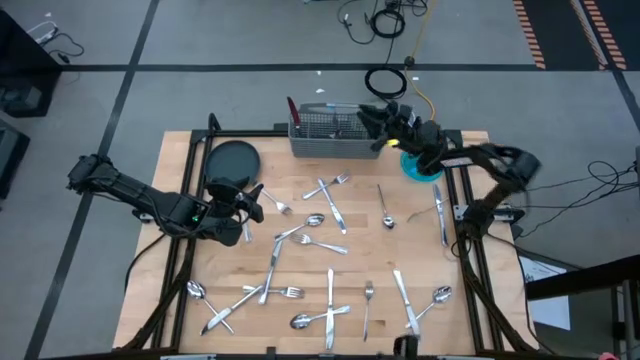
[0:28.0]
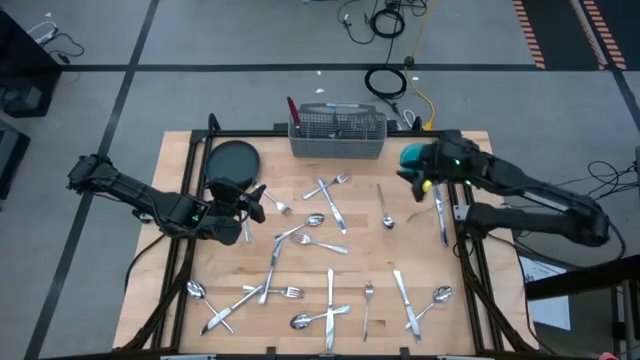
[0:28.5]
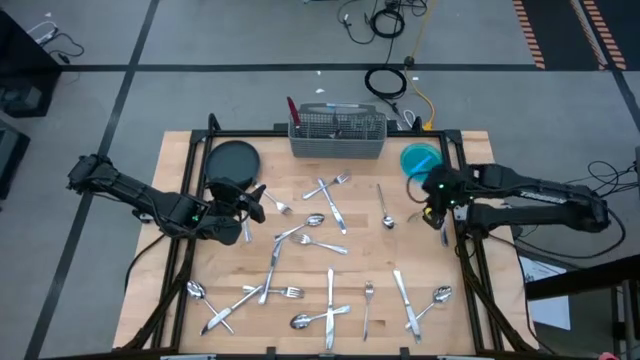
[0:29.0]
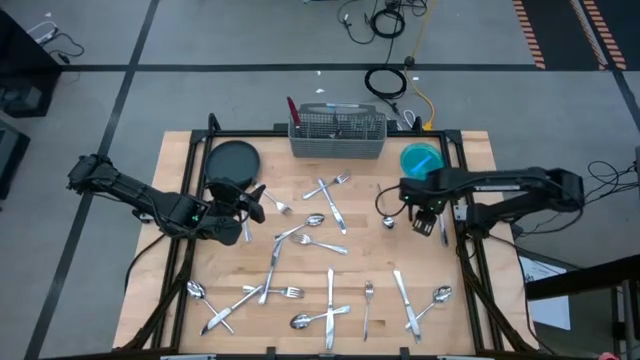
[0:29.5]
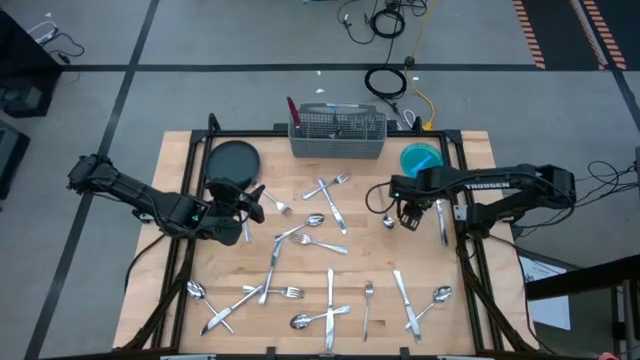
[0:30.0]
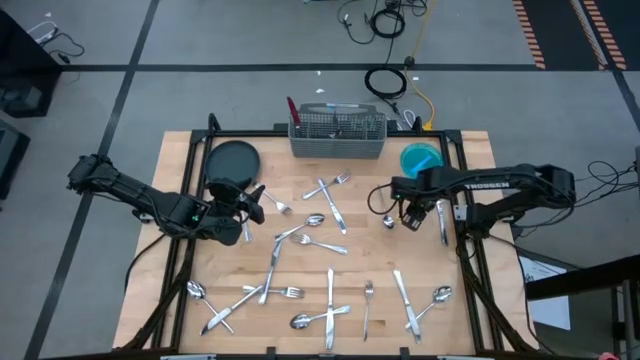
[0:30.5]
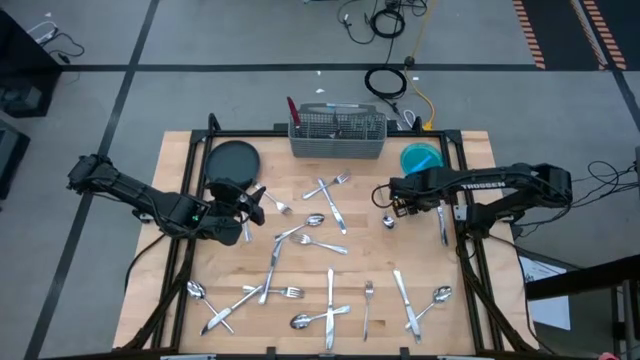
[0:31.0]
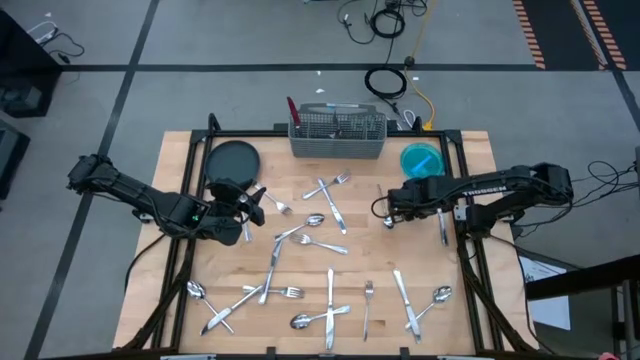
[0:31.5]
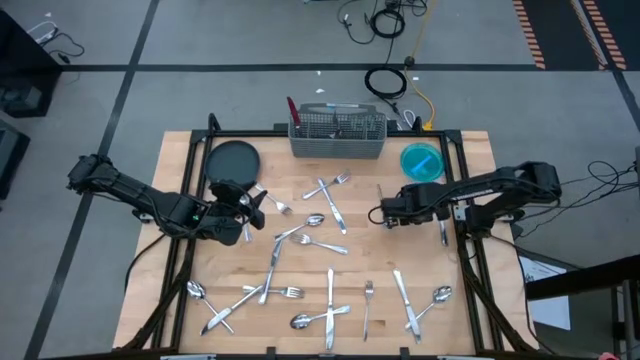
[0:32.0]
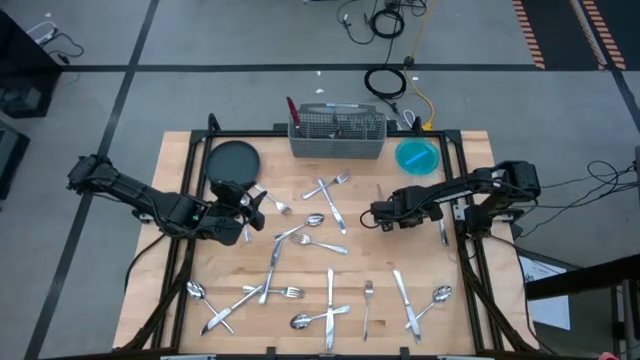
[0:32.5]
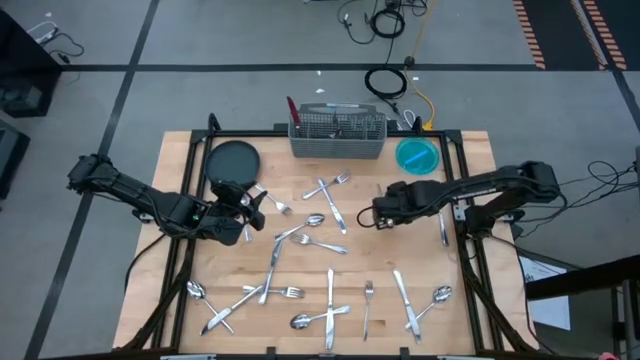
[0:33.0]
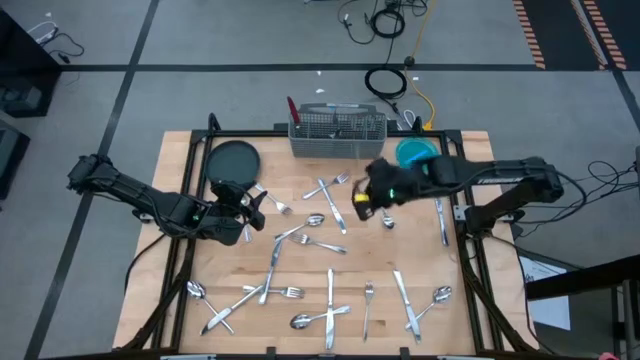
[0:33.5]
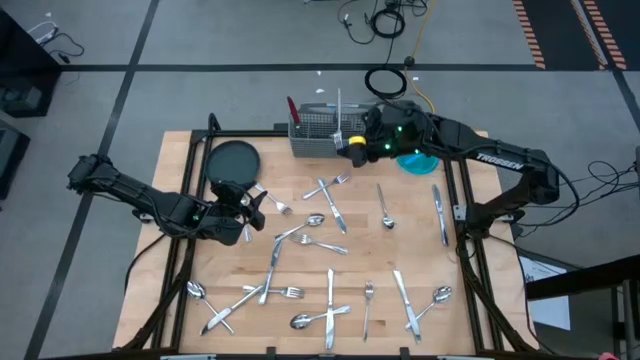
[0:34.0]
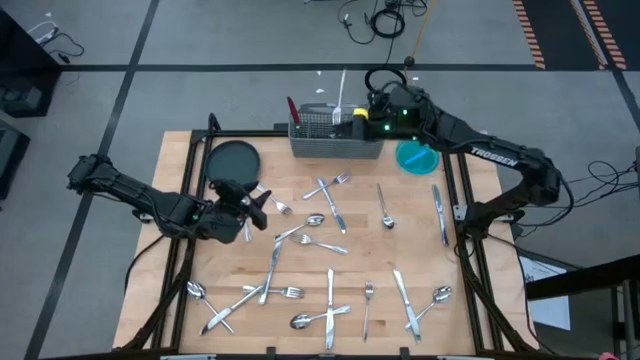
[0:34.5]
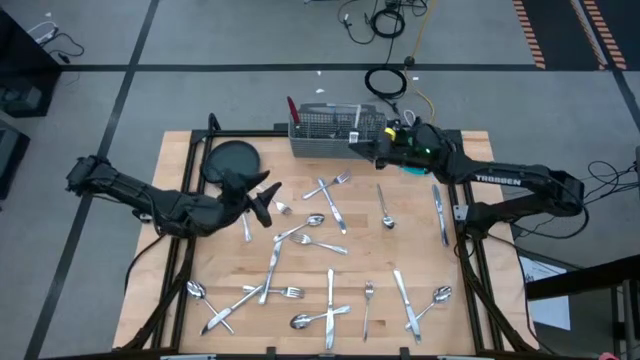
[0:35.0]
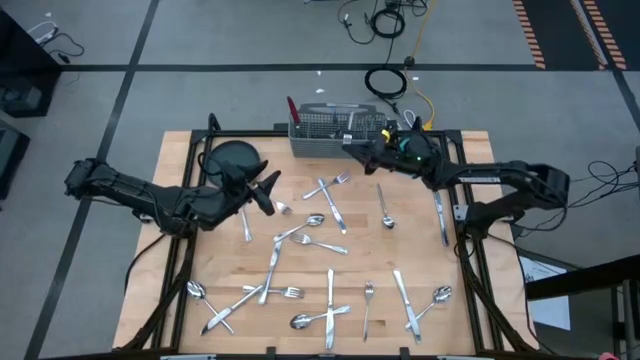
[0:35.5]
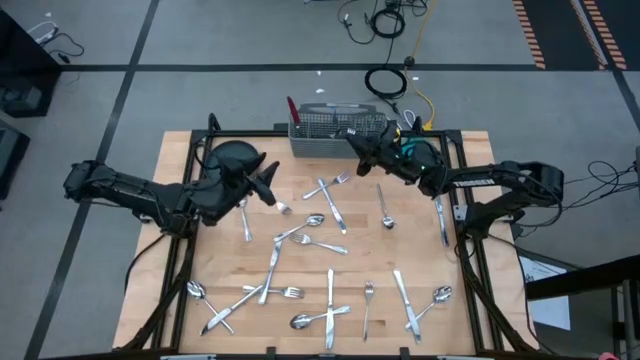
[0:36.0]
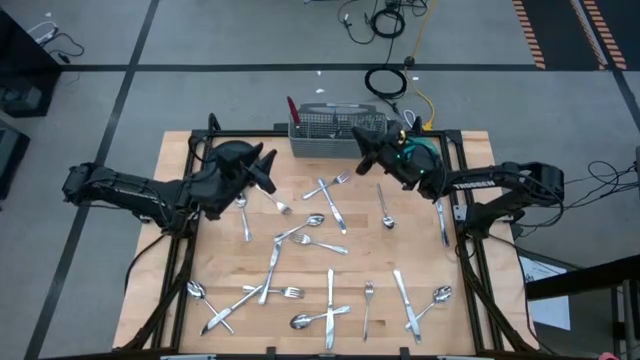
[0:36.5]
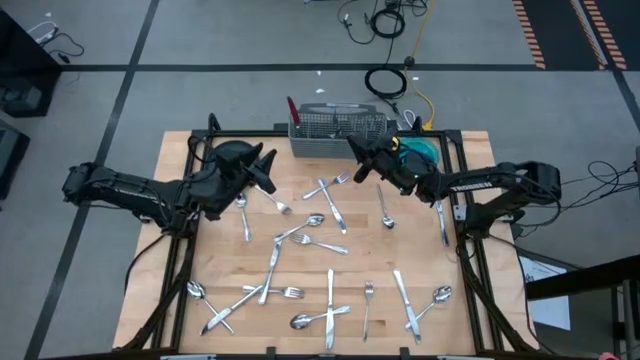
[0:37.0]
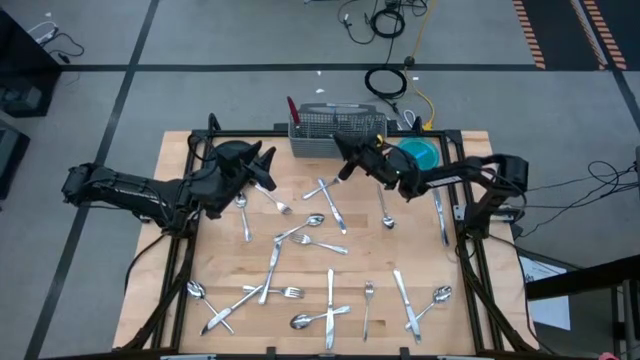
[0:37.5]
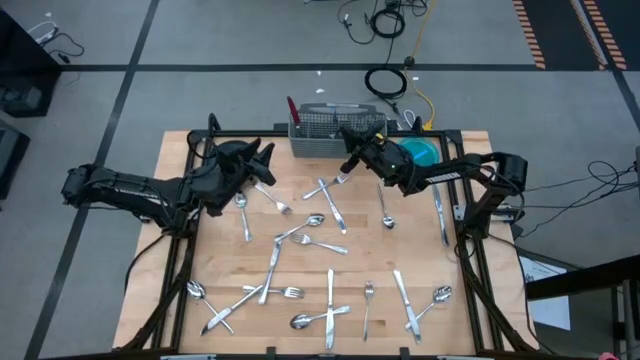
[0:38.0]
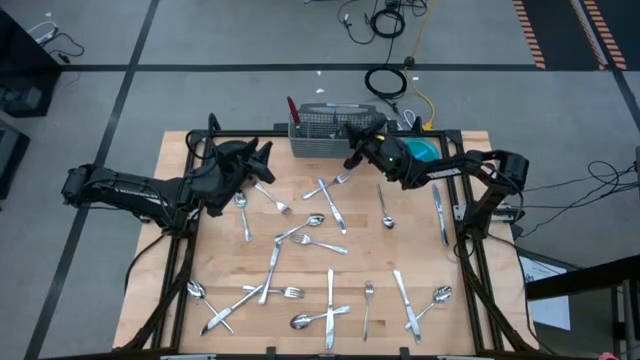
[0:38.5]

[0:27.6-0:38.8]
Task: Sort silverware
Put the fork into the silverware organizer

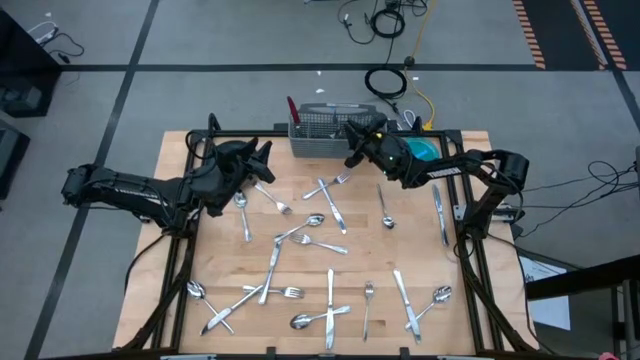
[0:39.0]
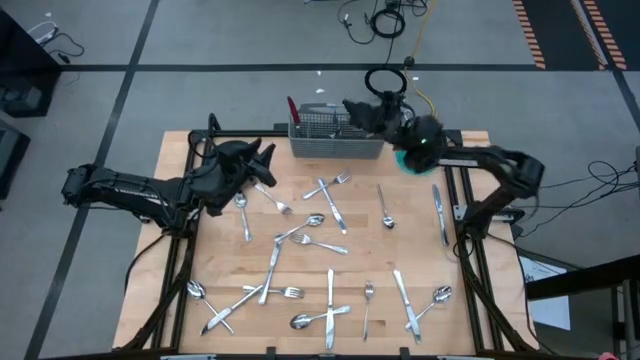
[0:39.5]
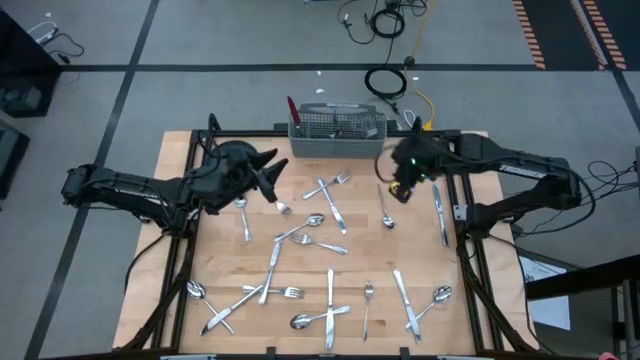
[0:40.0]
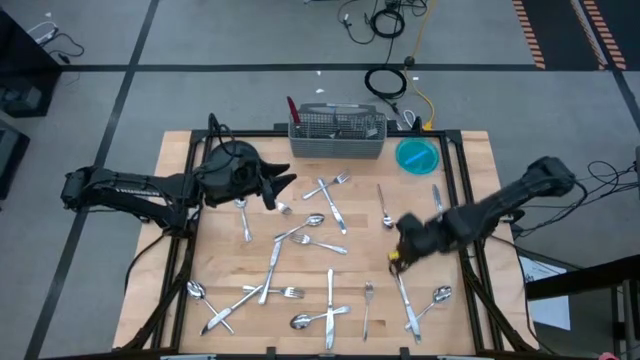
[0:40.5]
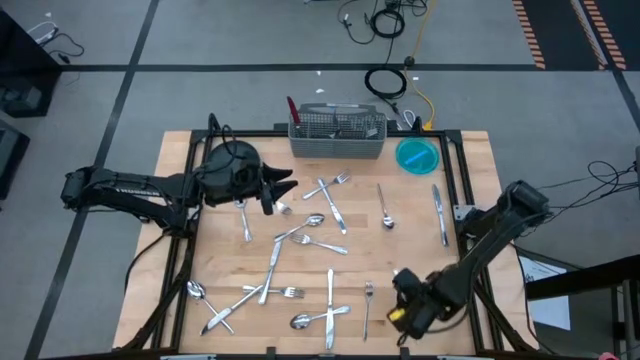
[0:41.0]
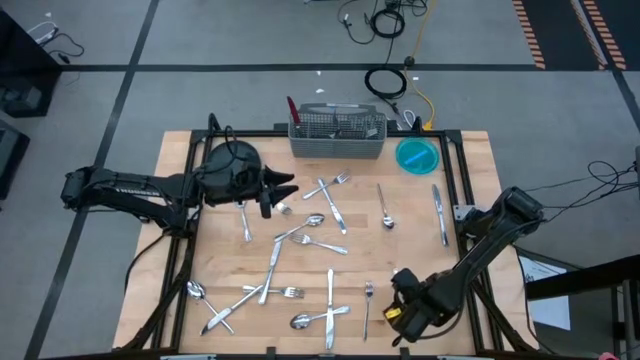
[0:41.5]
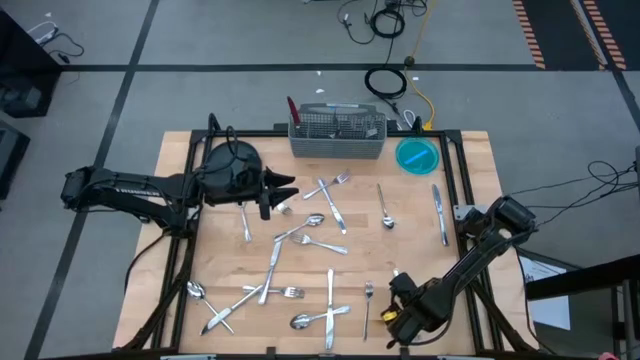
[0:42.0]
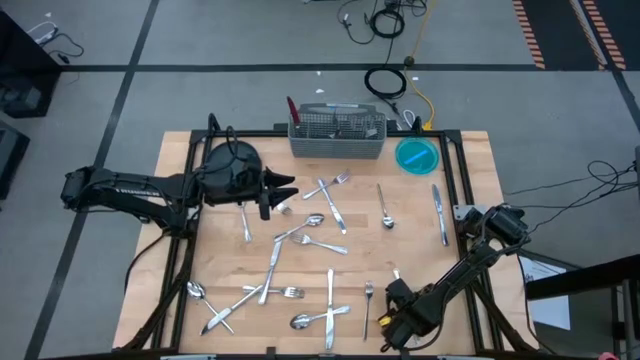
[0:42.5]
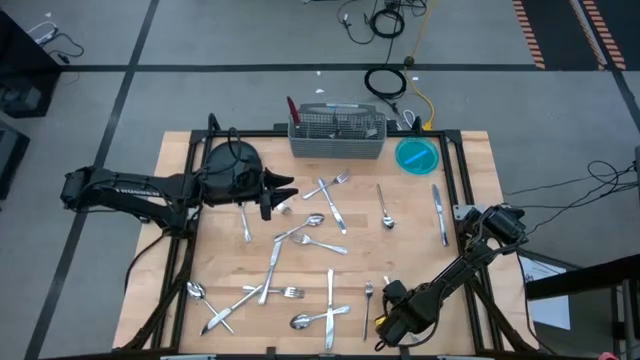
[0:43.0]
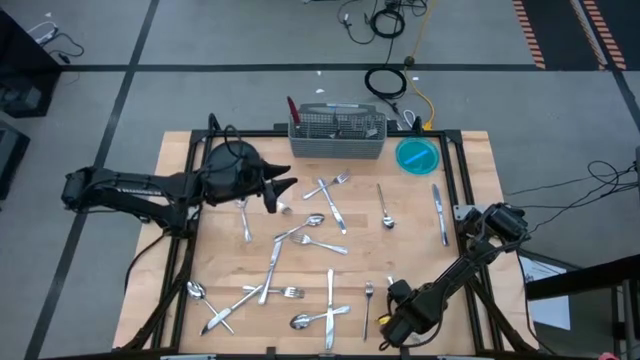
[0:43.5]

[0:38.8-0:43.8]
Put the table knife into the silverware organizer

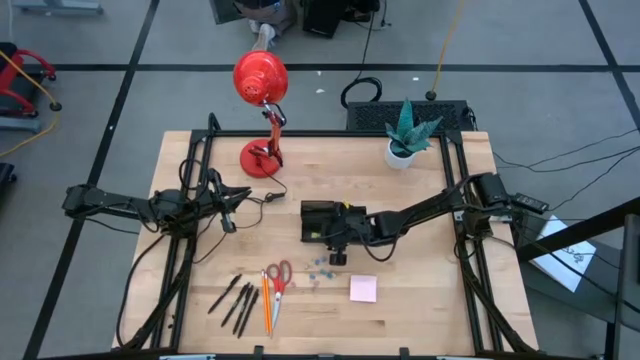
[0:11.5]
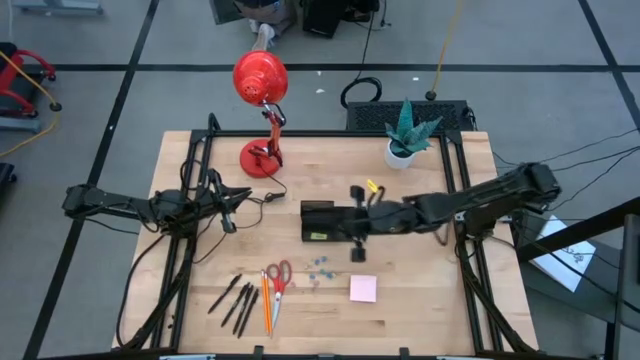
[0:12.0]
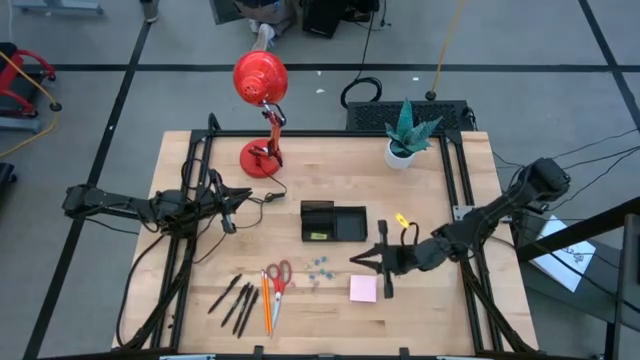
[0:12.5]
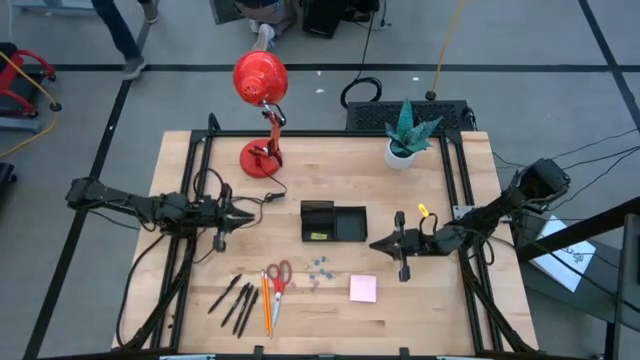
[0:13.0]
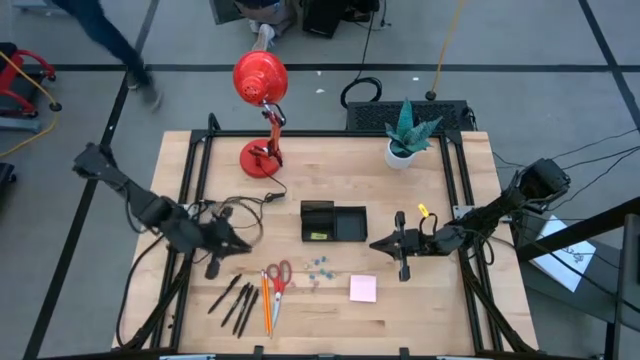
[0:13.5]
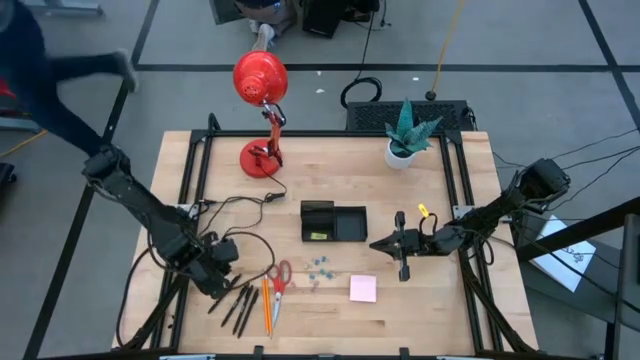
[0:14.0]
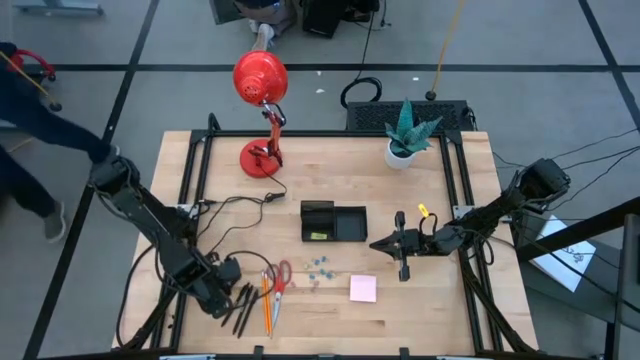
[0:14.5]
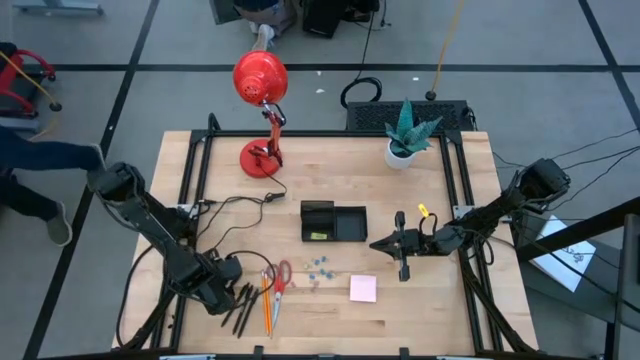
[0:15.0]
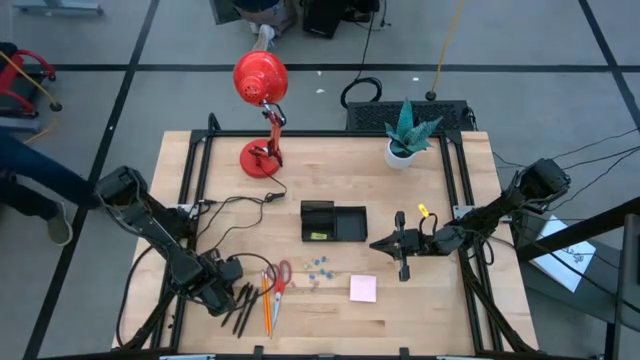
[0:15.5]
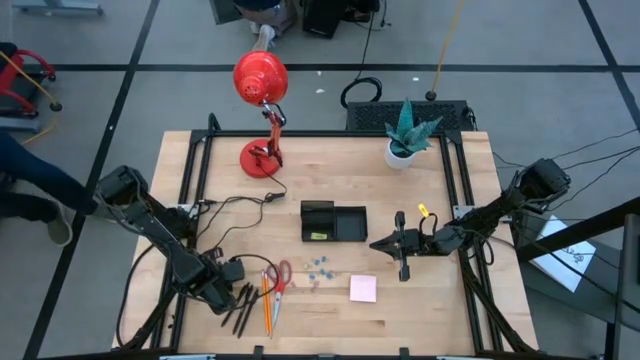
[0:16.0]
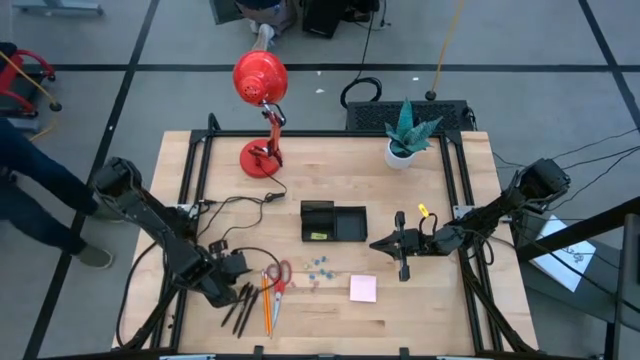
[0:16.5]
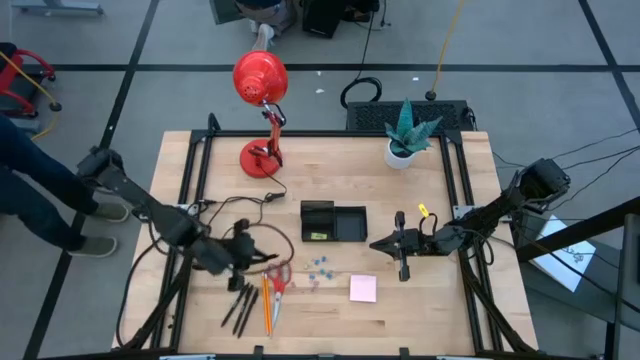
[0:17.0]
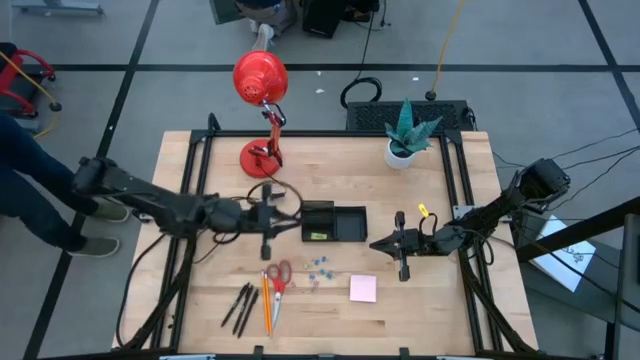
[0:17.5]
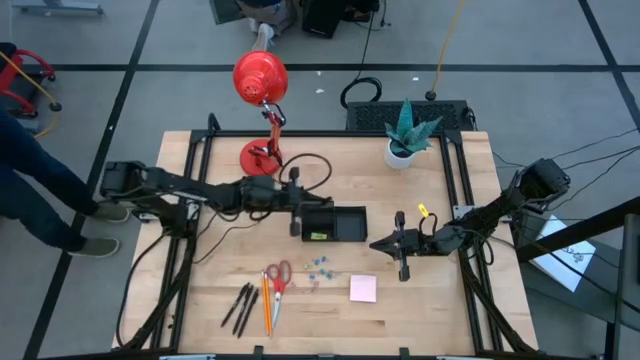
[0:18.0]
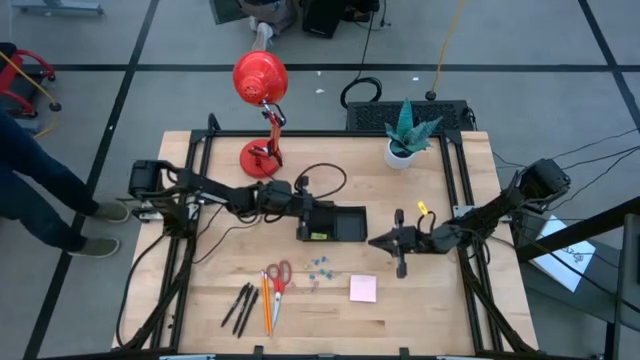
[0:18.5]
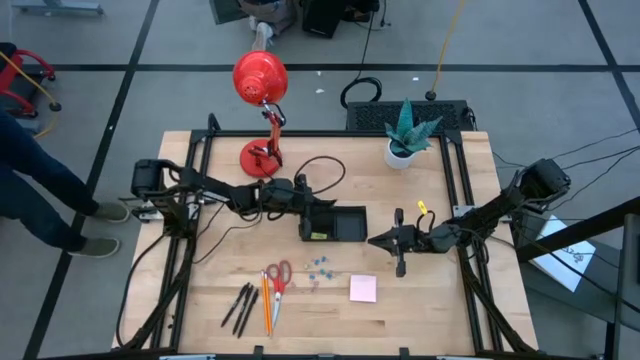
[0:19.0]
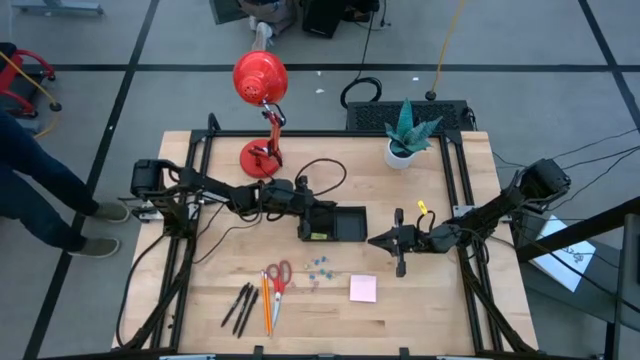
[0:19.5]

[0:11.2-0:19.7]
Task: Pick and place office supplies into organizer
Put the black pen into the desk organizer
